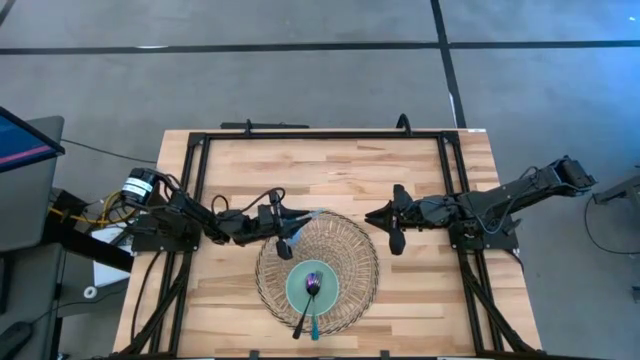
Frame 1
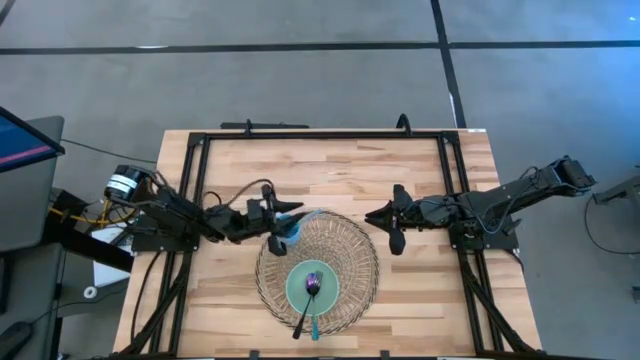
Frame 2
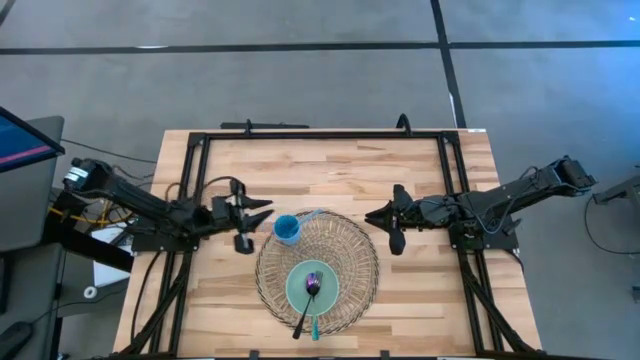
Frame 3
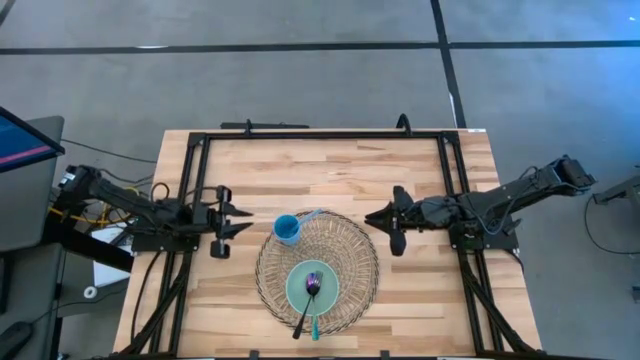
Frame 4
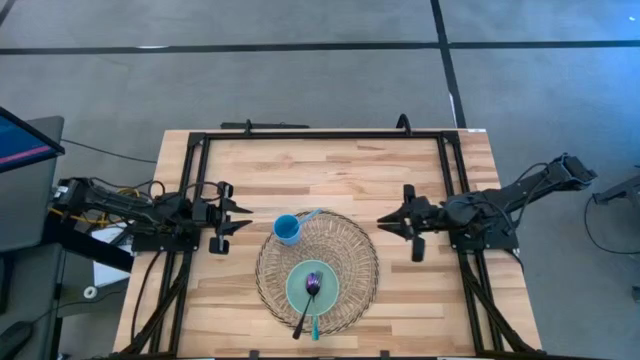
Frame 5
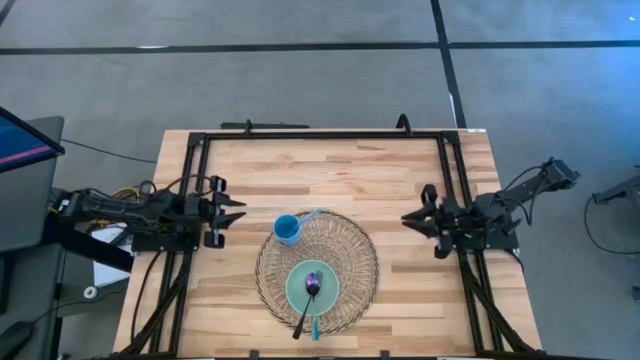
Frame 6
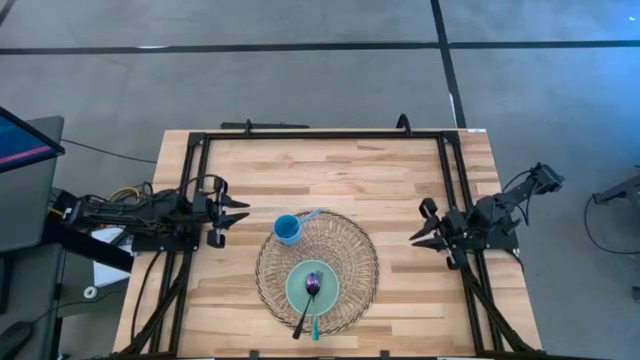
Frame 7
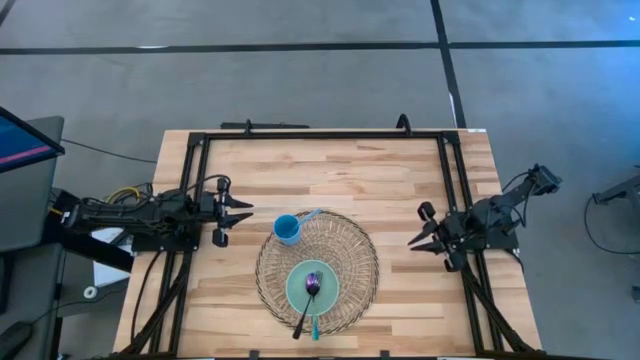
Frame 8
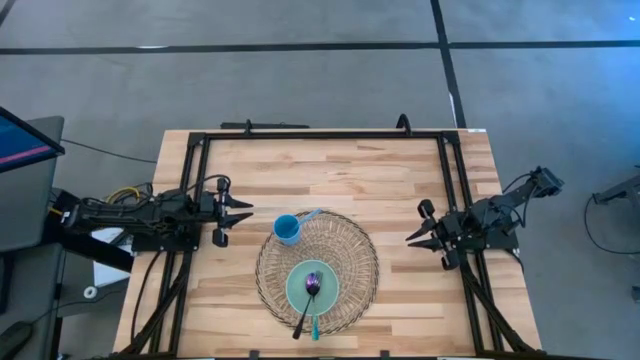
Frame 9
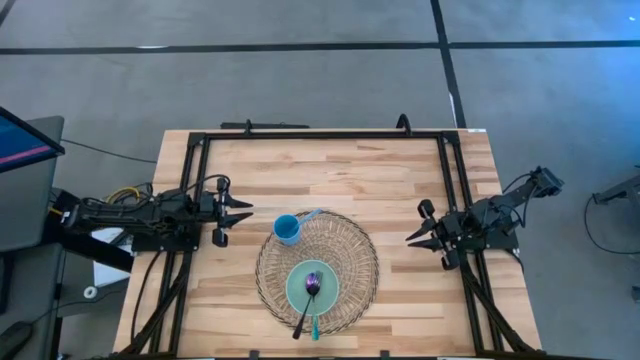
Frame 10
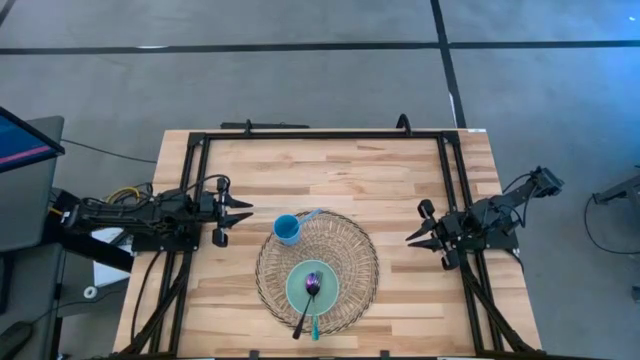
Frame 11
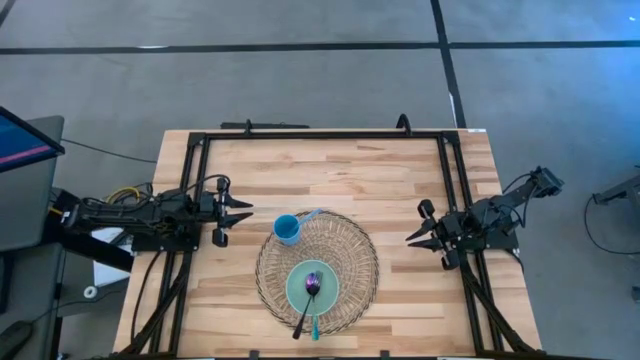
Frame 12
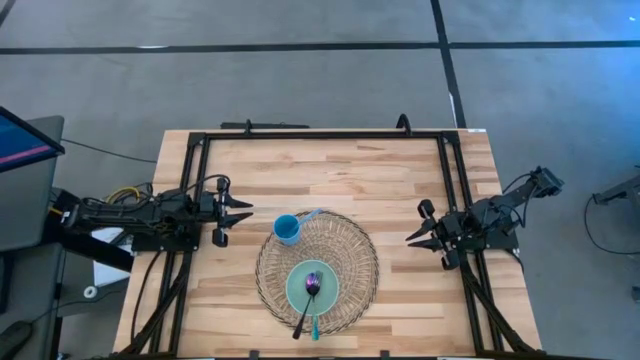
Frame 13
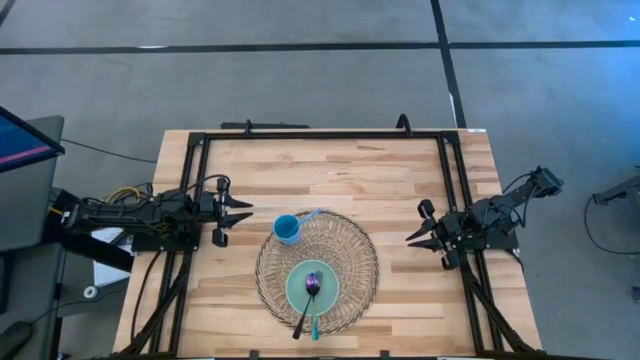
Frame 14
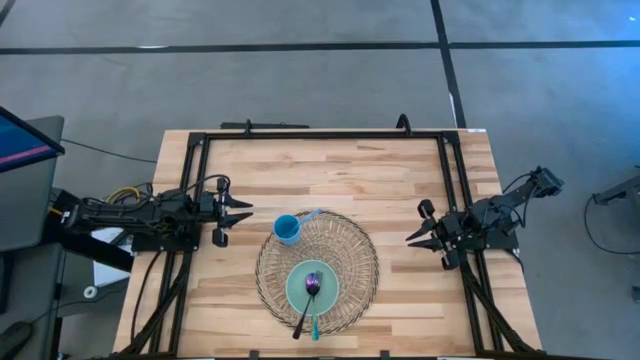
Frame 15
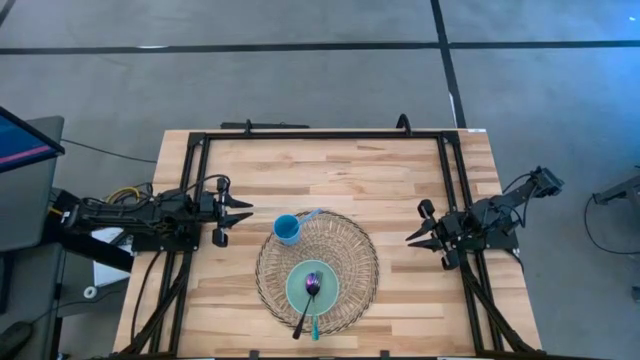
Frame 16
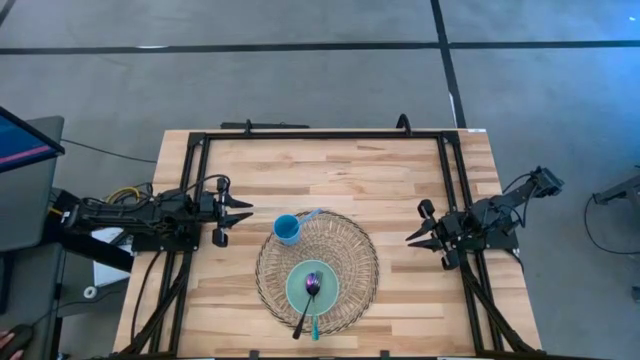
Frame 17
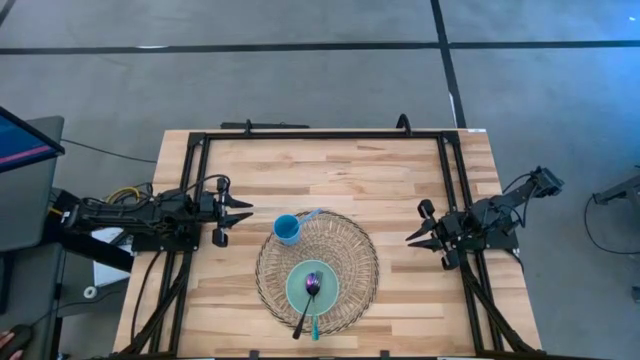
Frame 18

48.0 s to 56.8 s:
Task: Pick & Place Utensil
Return to Home Position

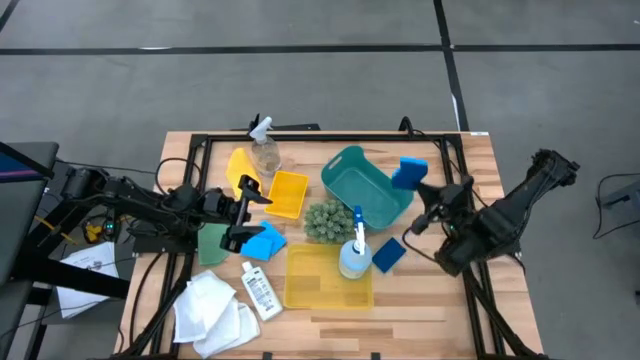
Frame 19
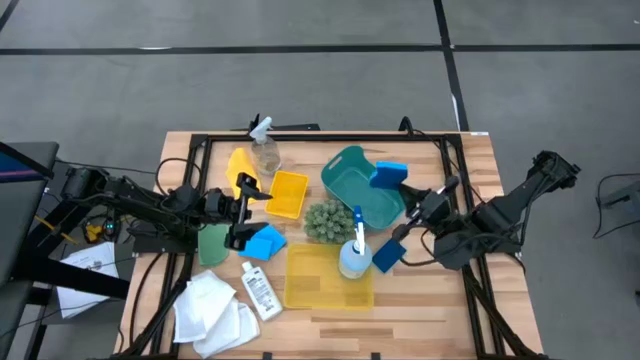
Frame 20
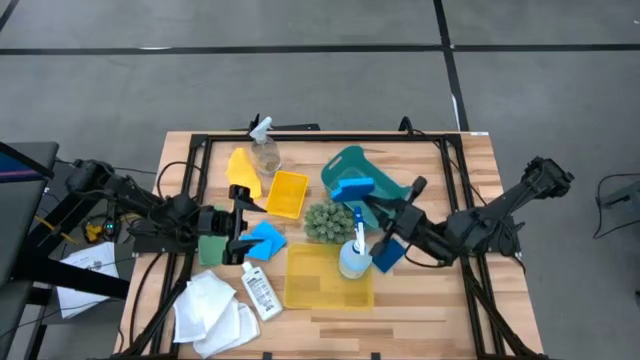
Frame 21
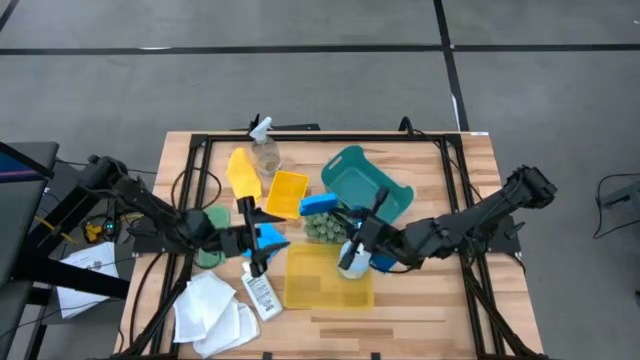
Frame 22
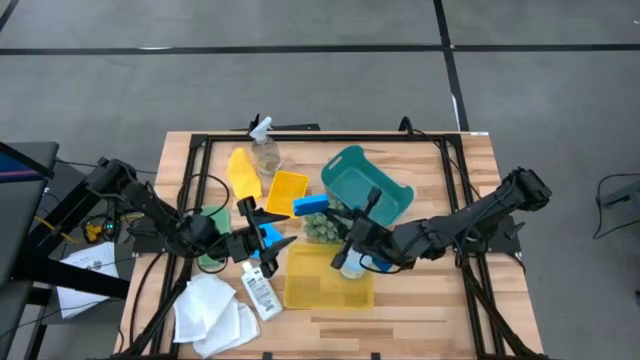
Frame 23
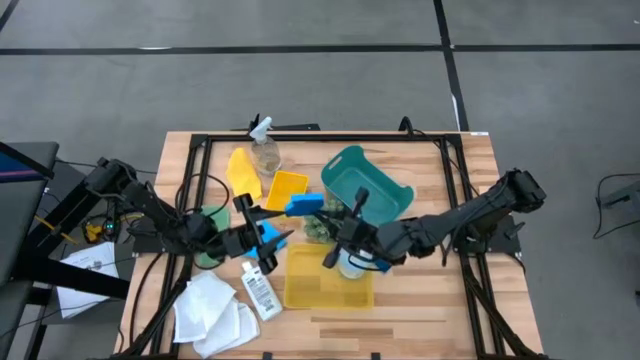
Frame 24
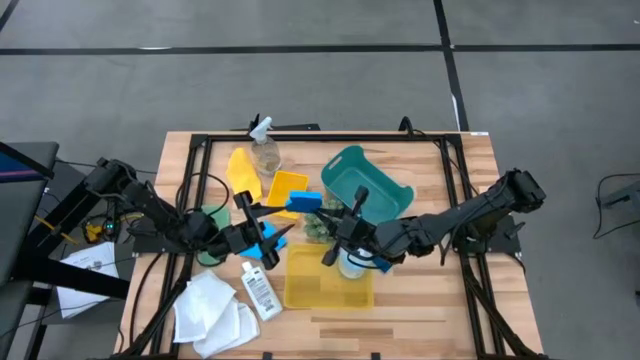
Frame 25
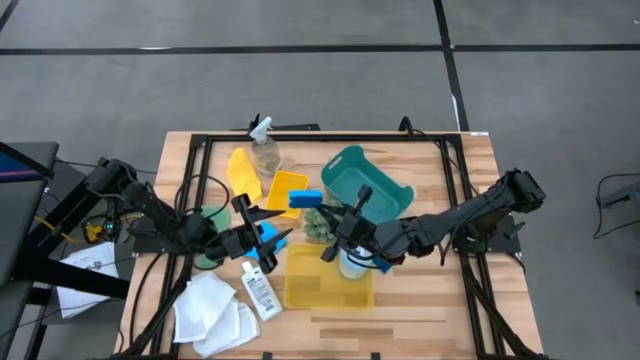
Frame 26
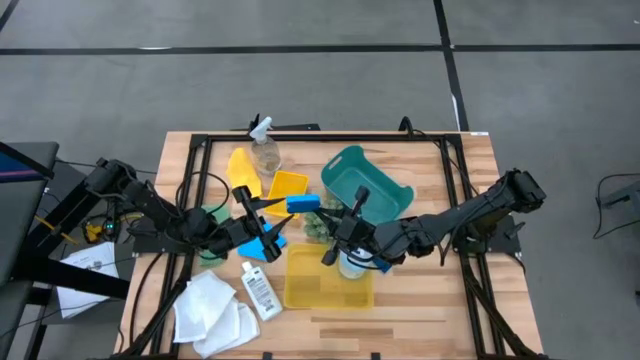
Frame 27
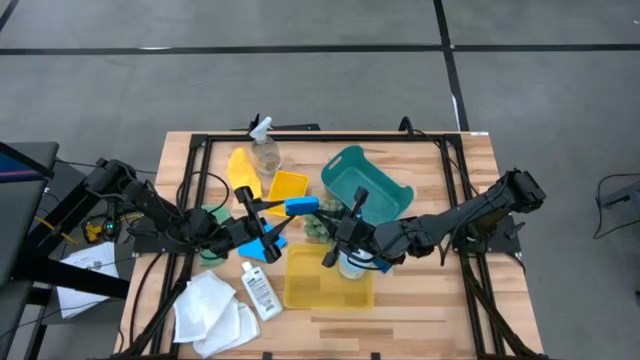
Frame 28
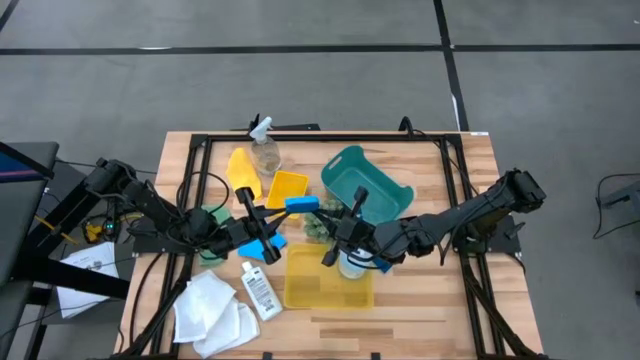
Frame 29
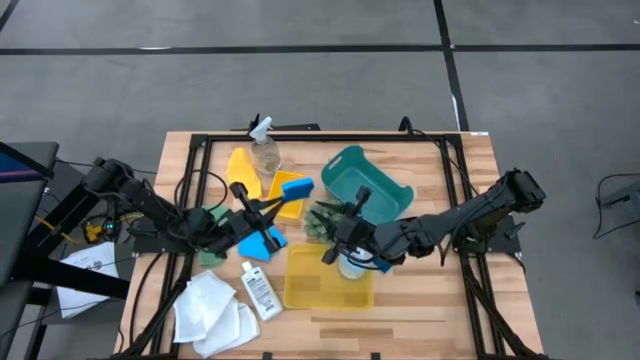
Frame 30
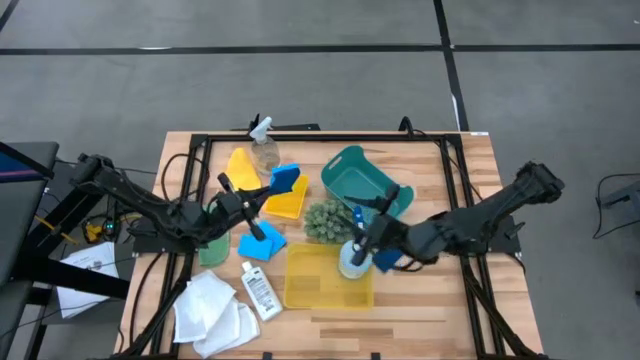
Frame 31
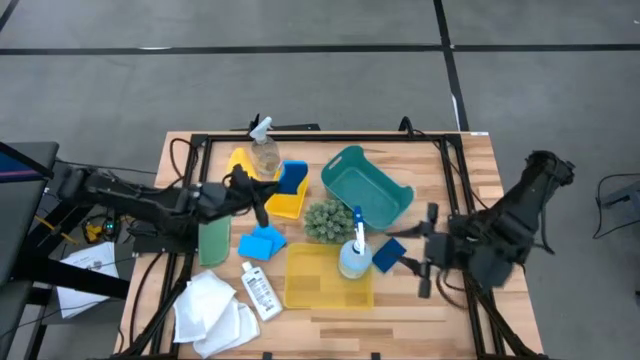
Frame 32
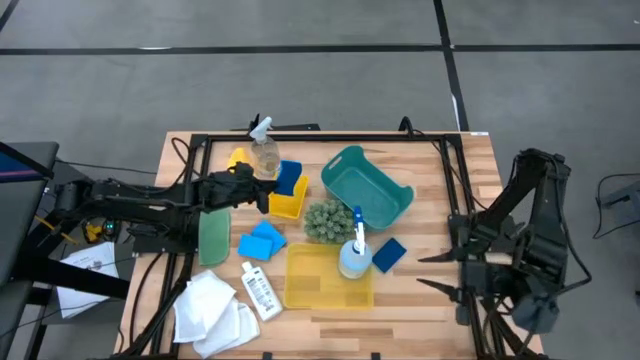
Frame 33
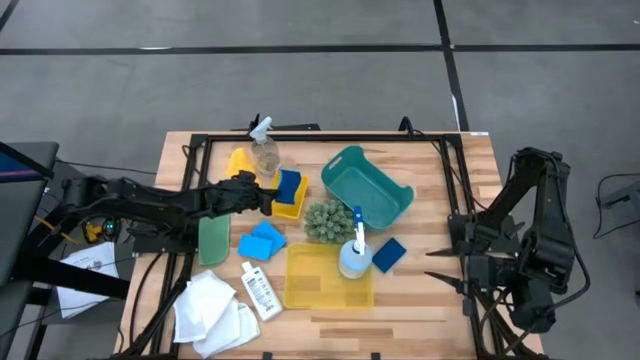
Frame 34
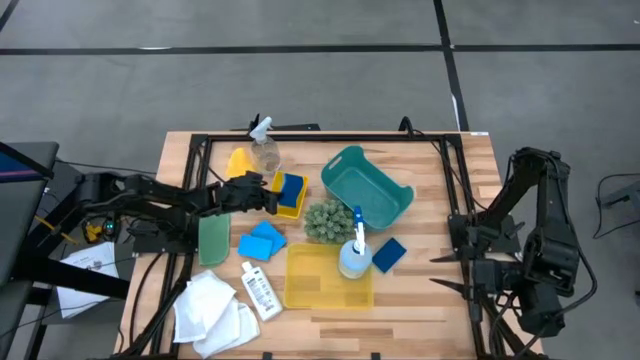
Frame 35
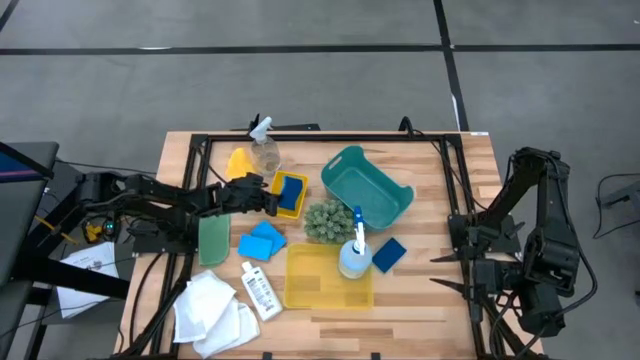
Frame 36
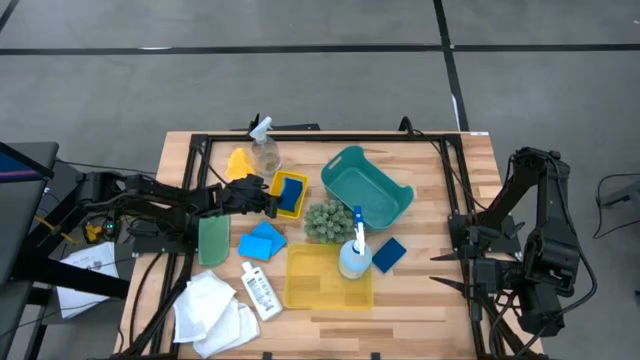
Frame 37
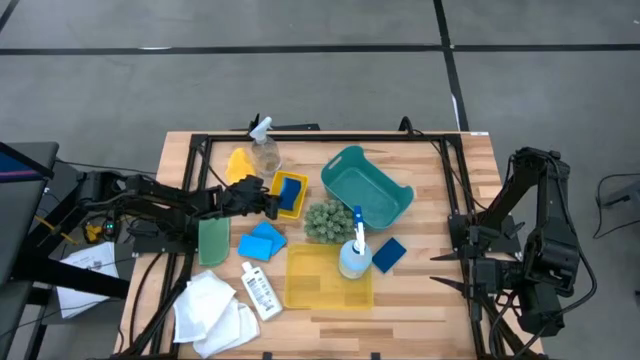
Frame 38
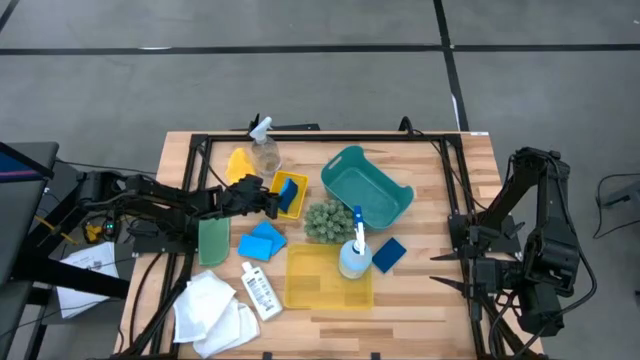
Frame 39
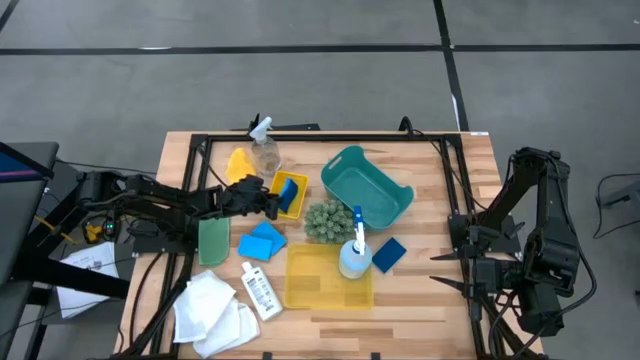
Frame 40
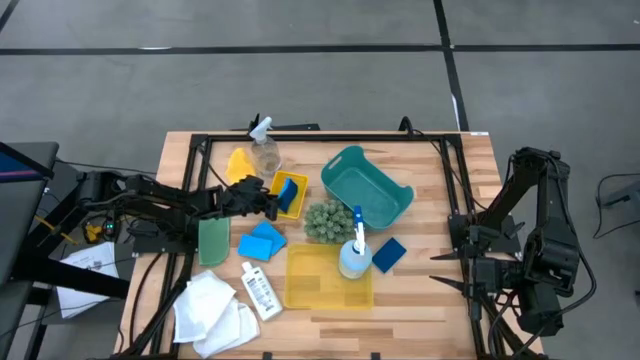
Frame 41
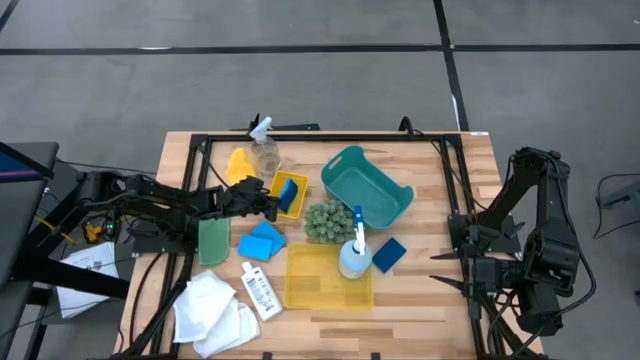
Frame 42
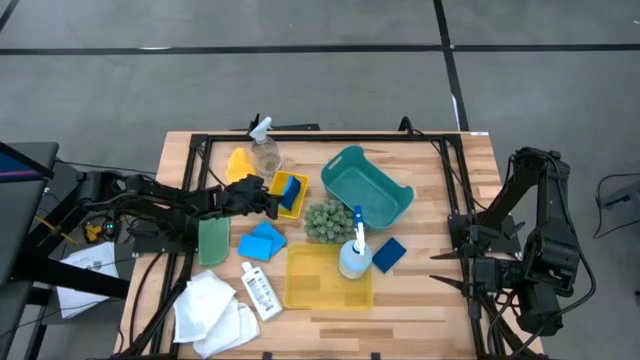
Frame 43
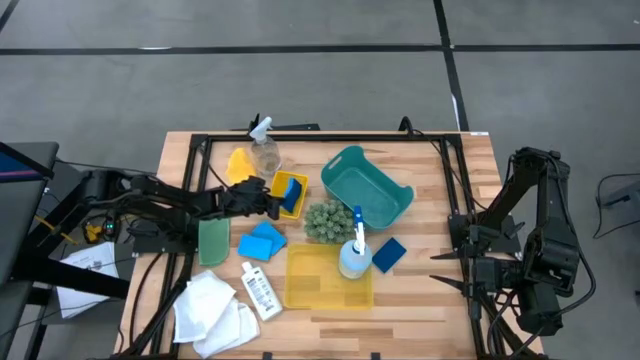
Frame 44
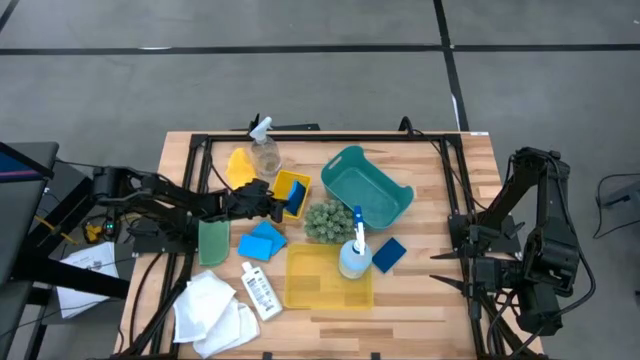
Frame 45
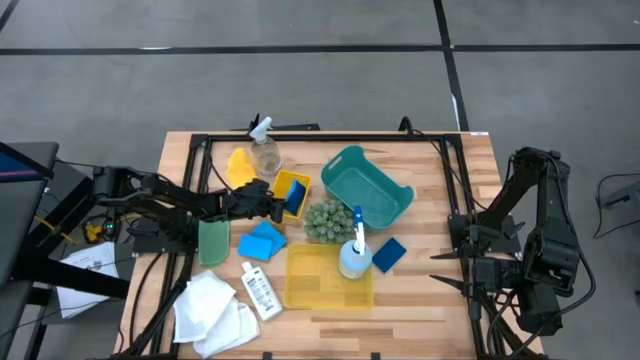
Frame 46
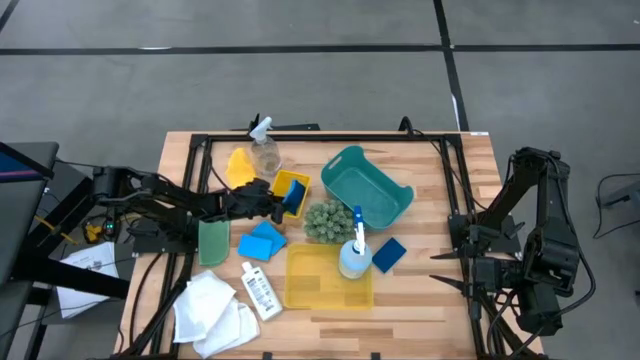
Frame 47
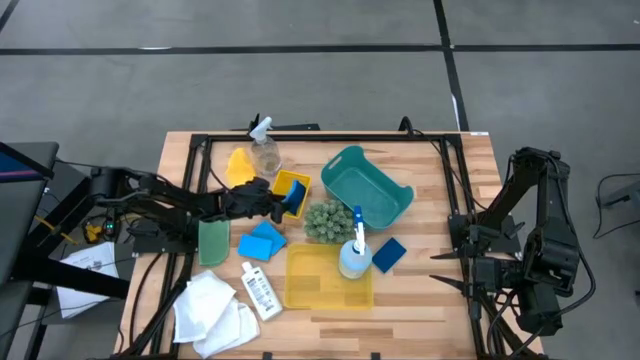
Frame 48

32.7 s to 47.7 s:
Task: Pick & Place Kitchen Items
Put the blue sponge into the top yellow bin
